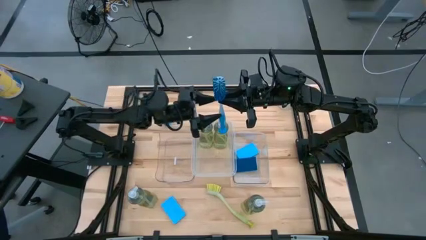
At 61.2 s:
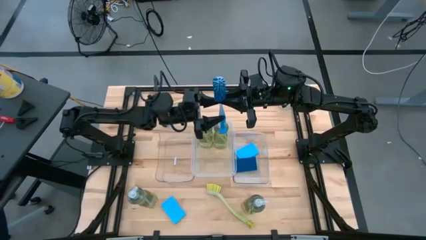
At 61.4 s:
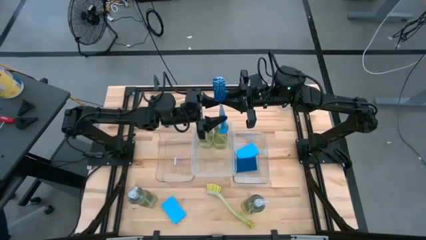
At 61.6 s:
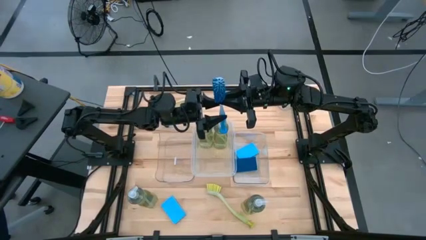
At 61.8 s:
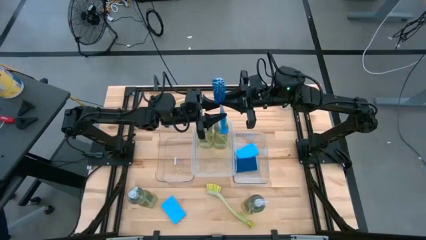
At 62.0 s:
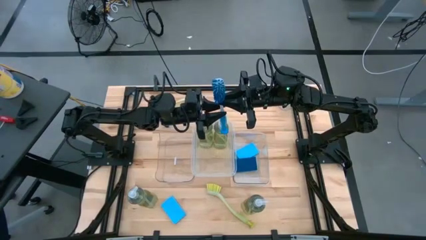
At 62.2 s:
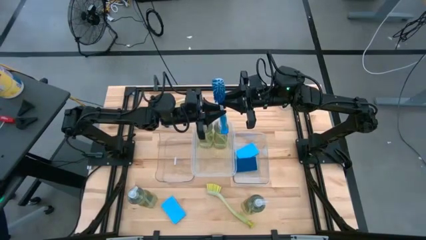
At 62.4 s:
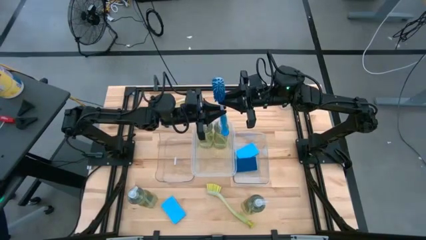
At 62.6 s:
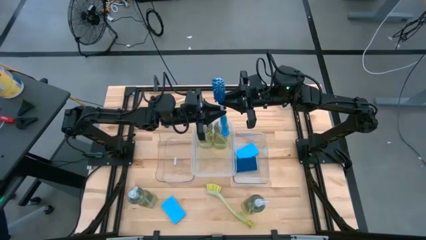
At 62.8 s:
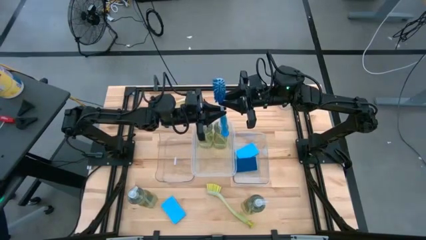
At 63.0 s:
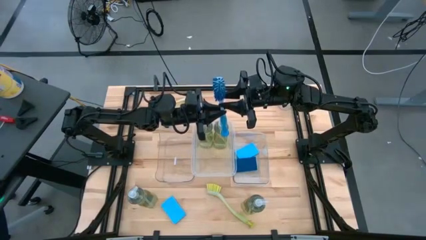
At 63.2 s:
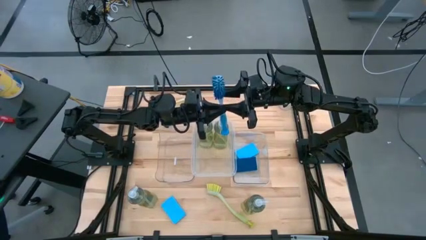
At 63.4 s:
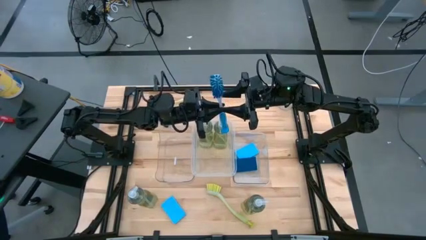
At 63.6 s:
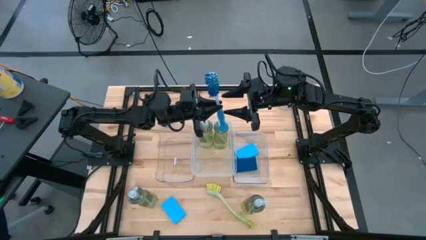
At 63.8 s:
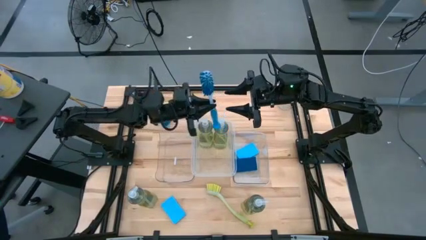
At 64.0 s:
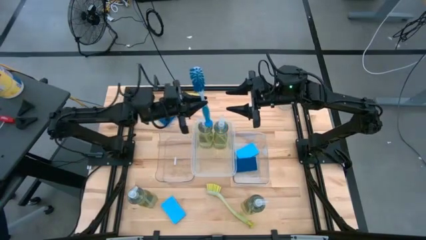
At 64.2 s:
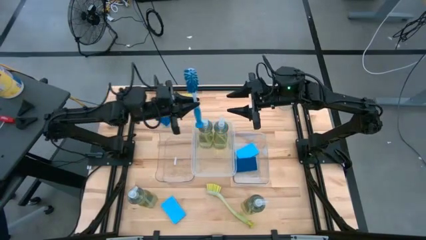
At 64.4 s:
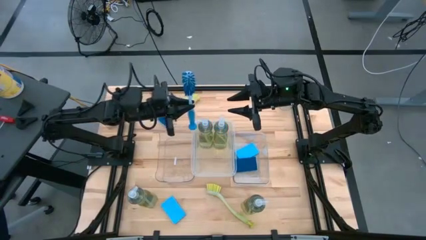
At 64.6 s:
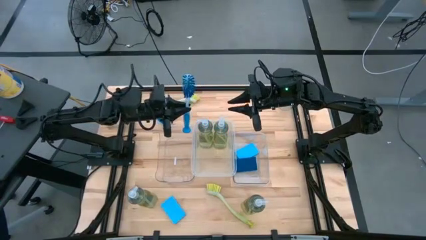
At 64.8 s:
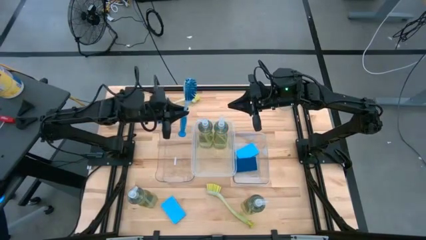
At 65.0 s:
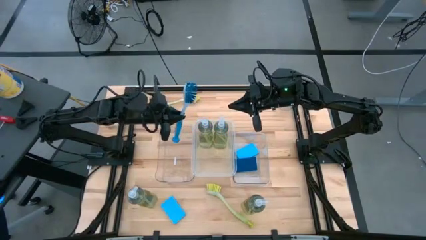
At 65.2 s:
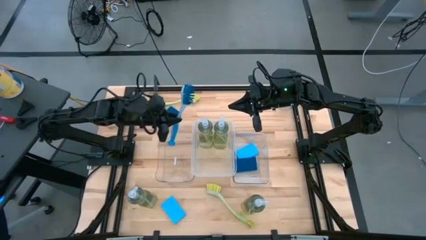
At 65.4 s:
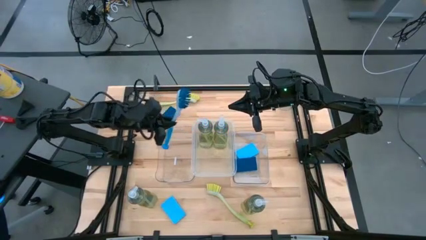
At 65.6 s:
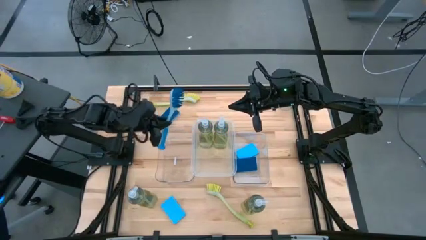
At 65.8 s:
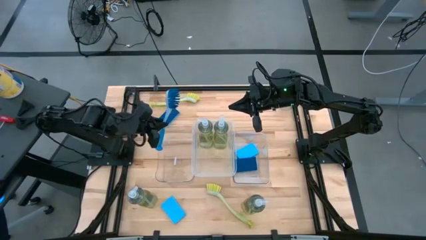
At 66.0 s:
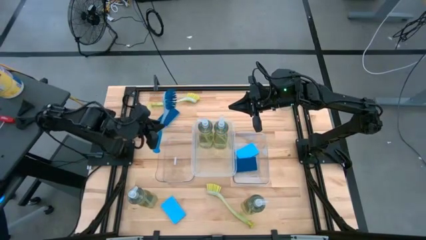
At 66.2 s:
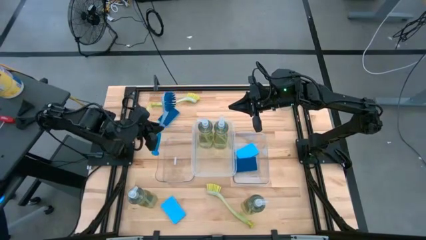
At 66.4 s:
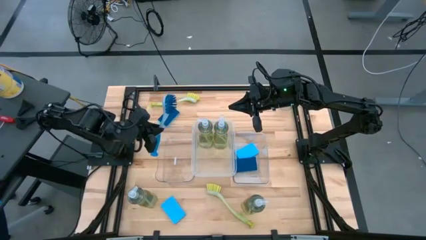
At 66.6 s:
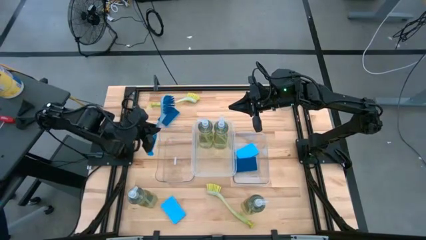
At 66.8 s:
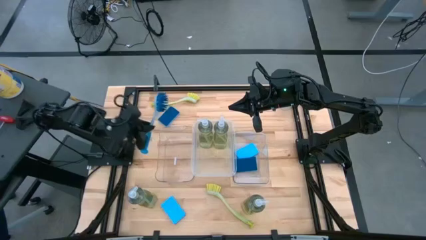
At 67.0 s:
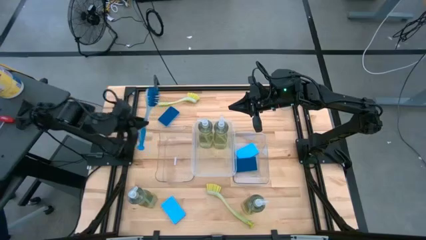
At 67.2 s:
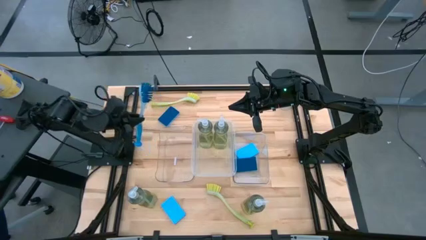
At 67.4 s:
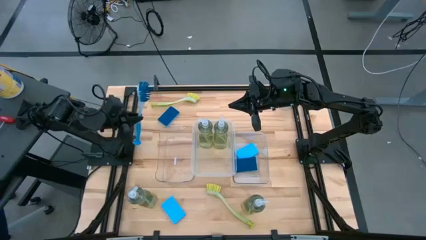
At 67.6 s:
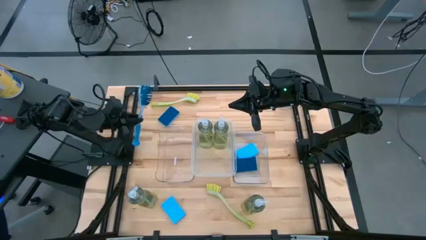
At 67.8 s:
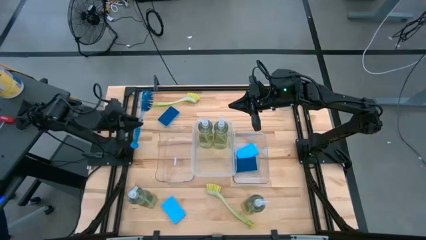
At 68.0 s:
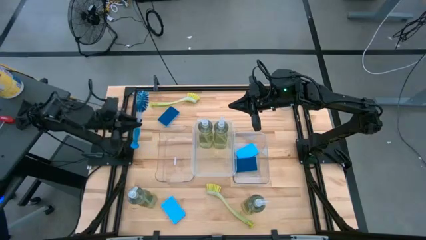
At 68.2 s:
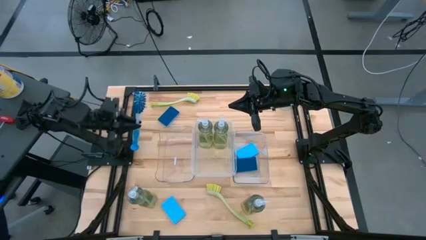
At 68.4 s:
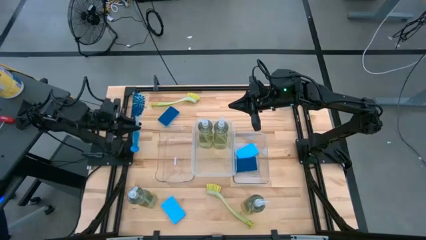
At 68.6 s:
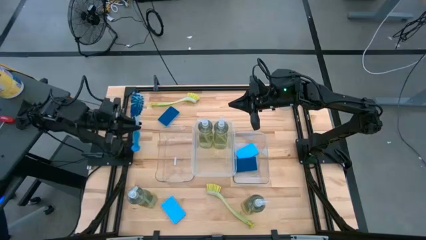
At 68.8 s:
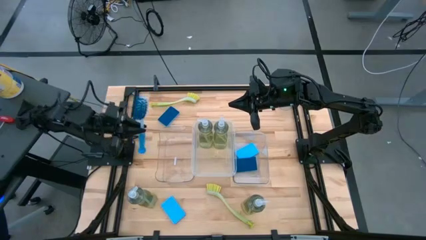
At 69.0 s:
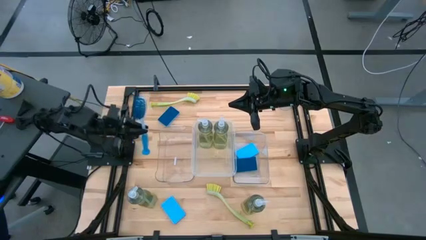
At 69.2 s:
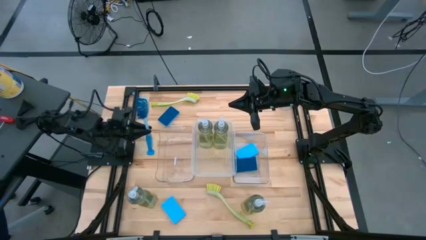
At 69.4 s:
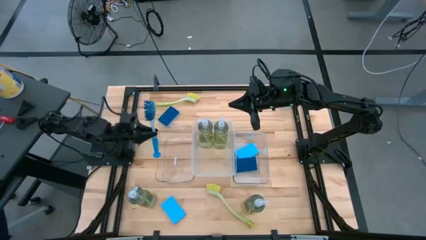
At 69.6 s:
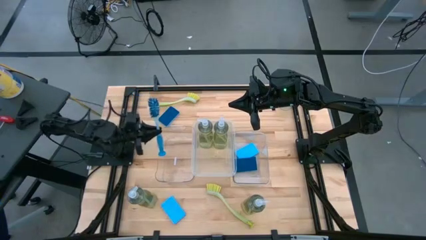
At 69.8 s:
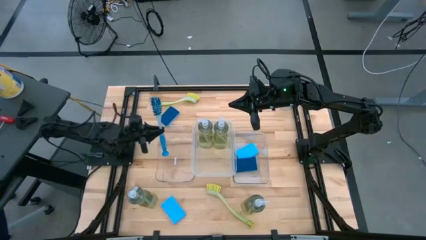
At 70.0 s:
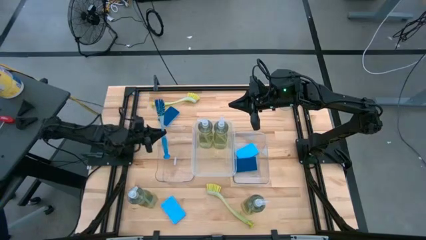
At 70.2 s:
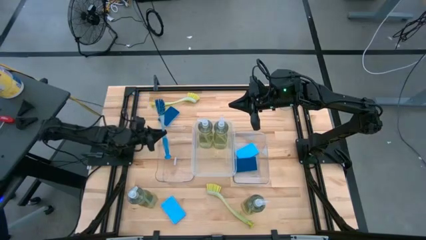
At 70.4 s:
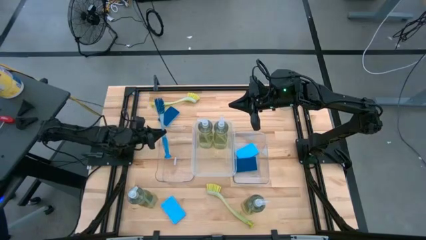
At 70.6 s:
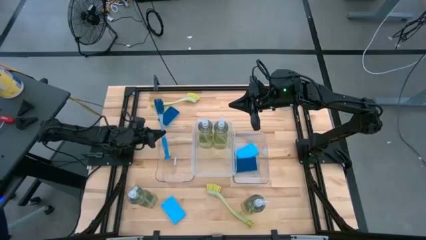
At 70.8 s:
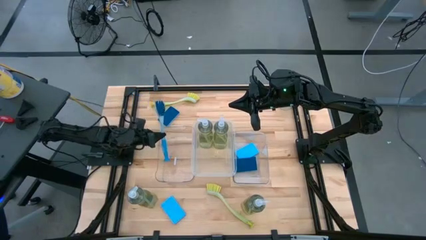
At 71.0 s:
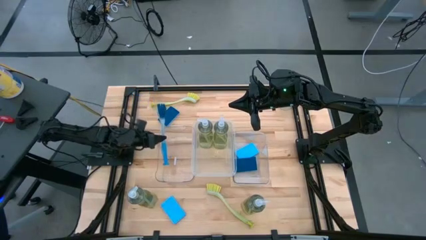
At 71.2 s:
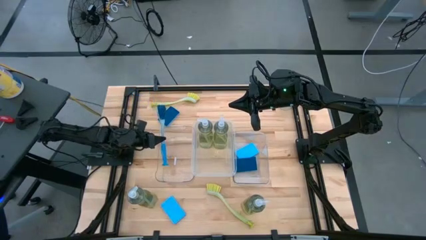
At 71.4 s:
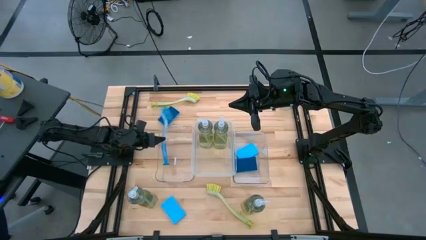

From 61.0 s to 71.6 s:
Task: Pick & Place Kitchen Sink Supplies
Put the blue dishwashing brush into the left transparent bin

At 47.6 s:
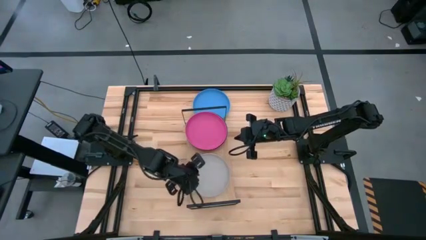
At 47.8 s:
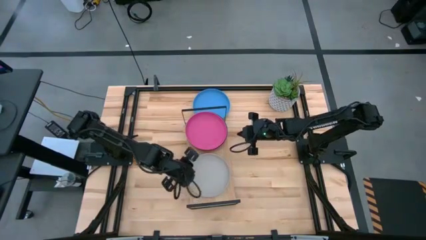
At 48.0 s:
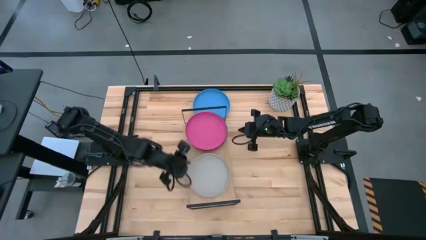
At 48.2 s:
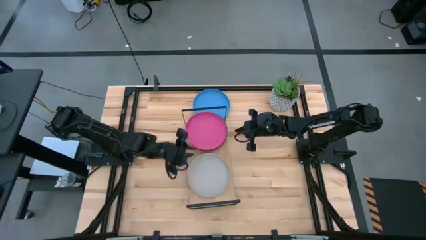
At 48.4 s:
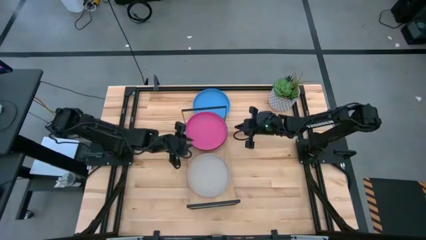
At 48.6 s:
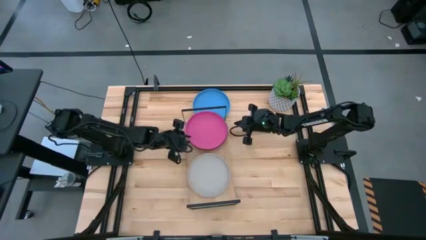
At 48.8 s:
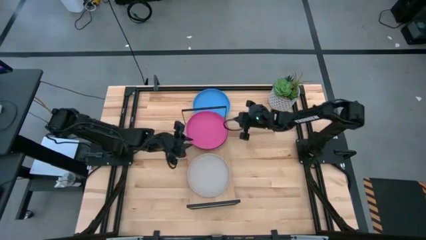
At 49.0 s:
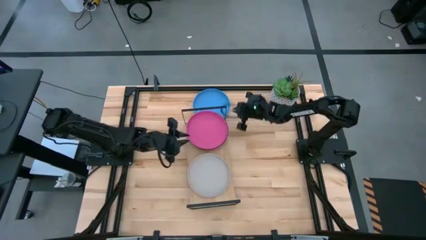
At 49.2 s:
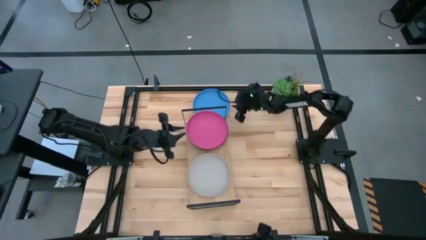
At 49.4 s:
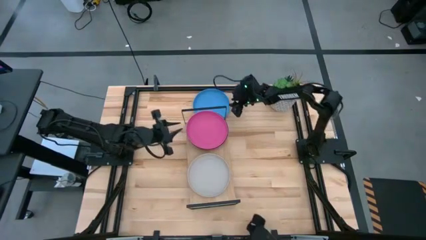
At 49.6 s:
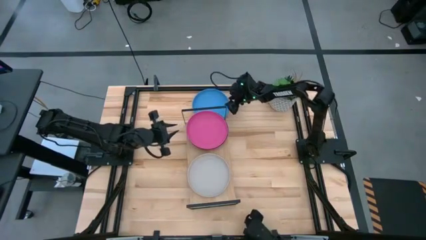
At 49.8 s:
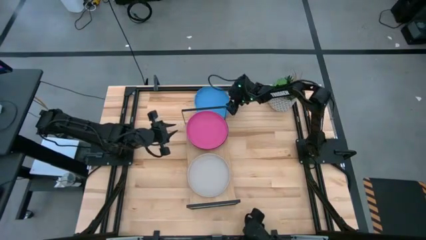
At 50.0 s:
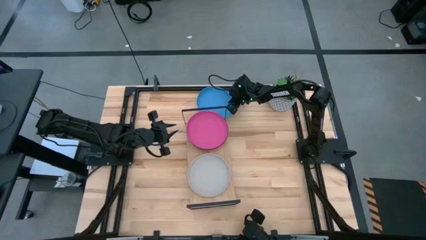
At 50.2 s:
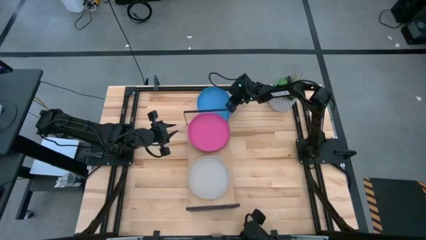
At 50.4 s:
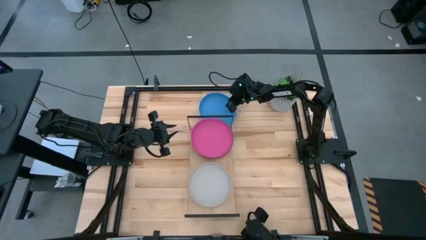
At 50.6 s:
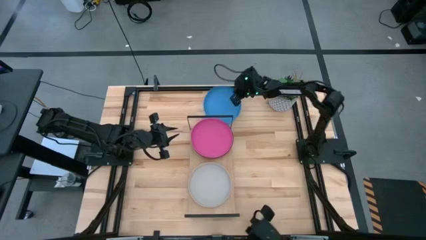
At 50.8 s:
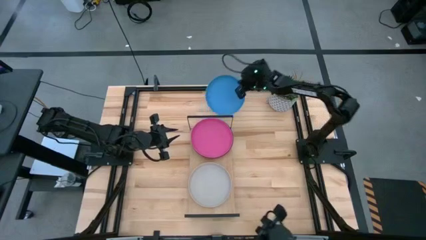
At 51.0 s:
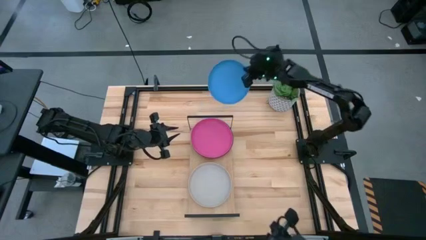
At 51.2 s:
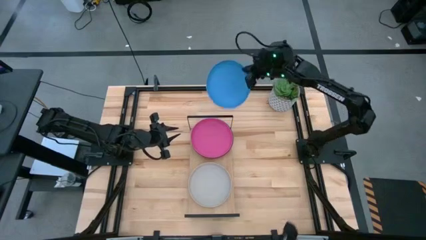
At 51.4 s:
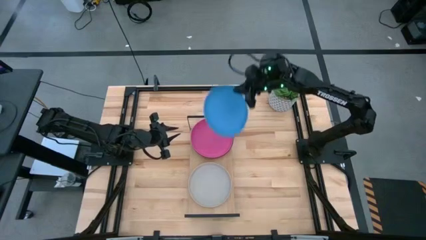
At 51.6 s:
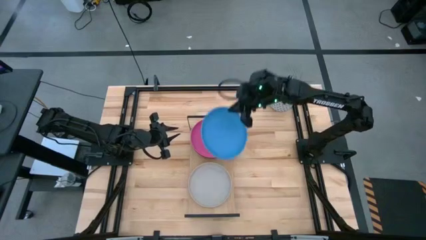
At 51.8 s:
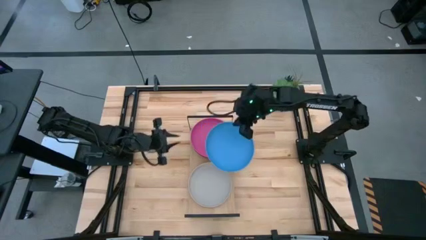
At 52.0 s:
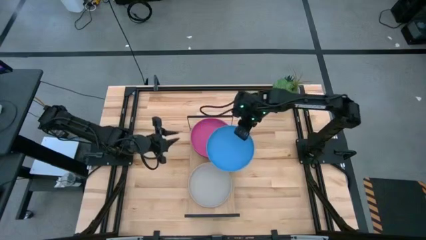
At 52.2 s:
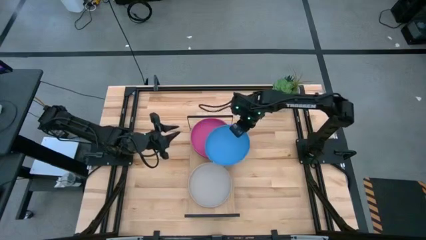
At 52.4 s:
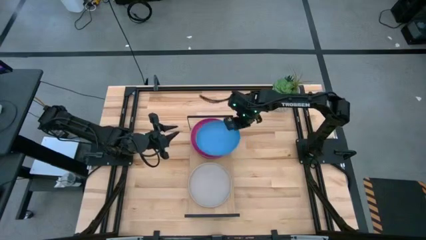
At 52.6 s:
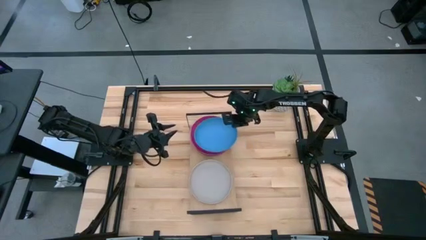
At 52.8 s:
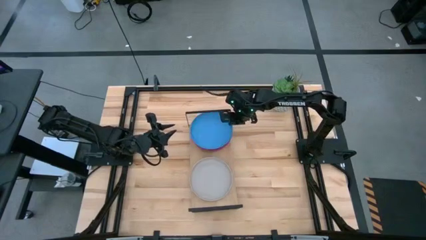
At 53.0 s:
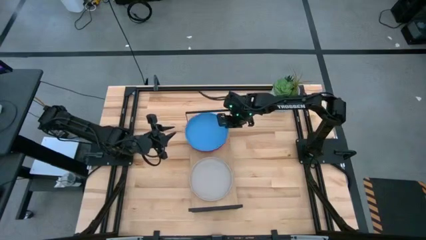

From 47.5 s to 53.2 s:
Task: Place and stack plates onto a shelf
Stack the blue plate on top of the pink plate on the shelf
